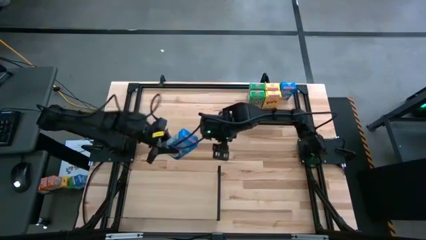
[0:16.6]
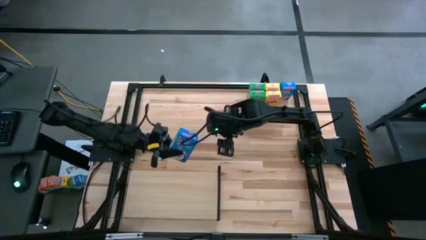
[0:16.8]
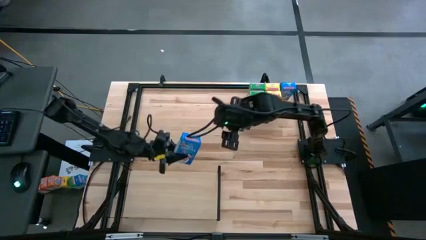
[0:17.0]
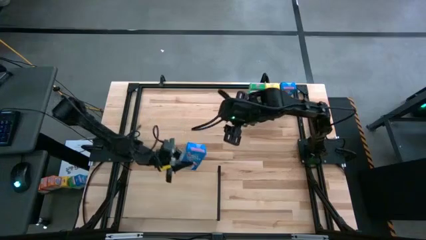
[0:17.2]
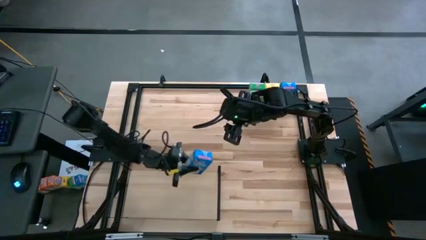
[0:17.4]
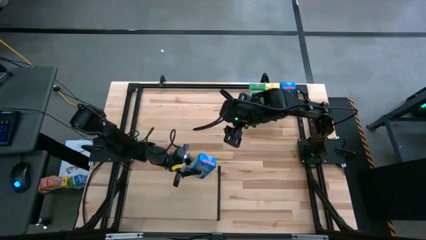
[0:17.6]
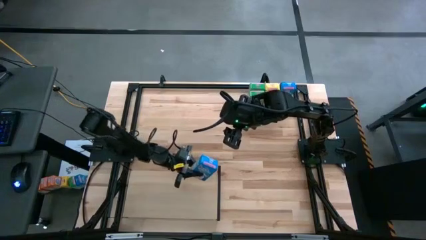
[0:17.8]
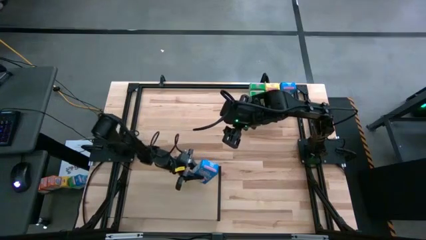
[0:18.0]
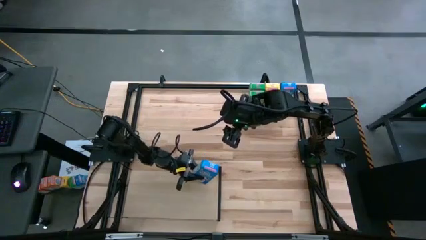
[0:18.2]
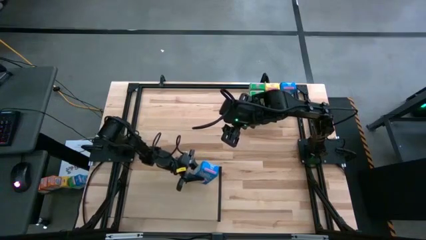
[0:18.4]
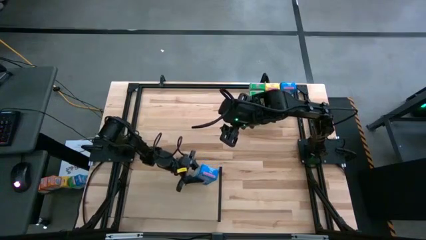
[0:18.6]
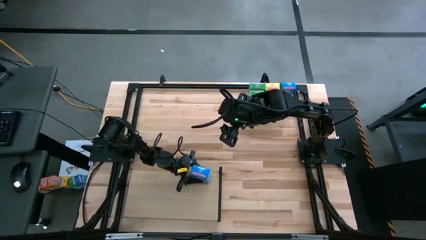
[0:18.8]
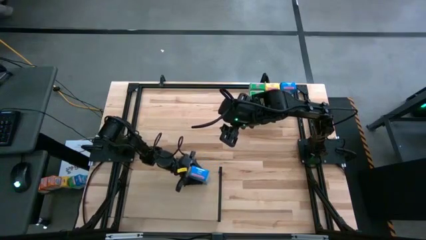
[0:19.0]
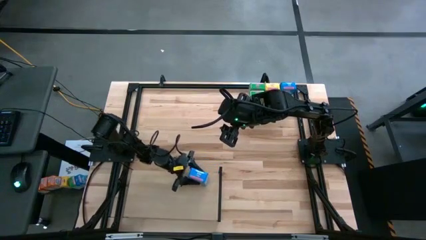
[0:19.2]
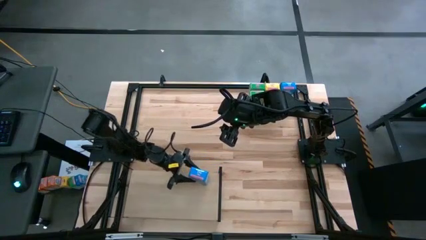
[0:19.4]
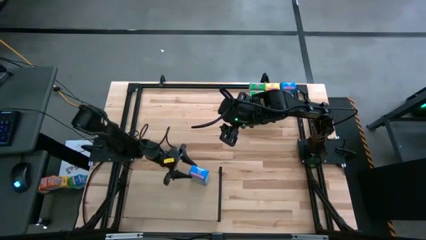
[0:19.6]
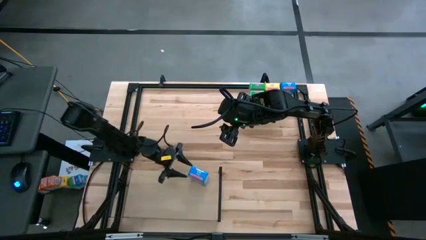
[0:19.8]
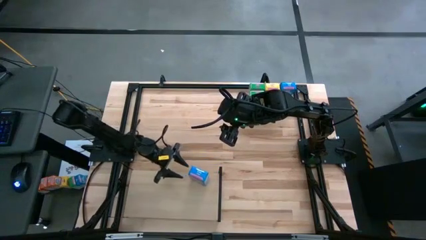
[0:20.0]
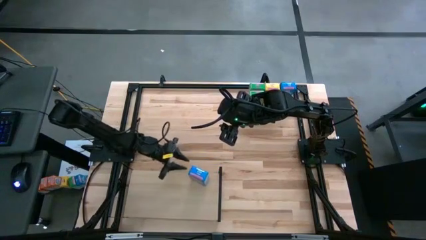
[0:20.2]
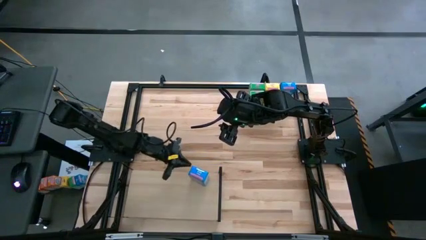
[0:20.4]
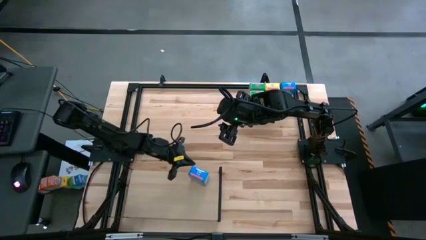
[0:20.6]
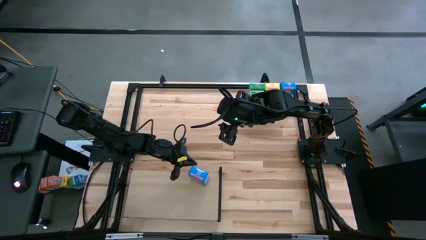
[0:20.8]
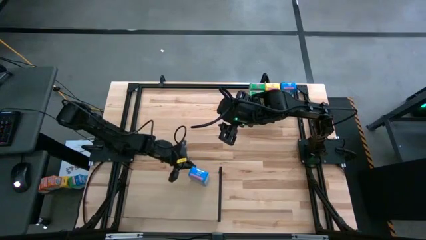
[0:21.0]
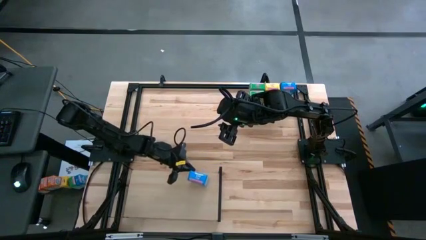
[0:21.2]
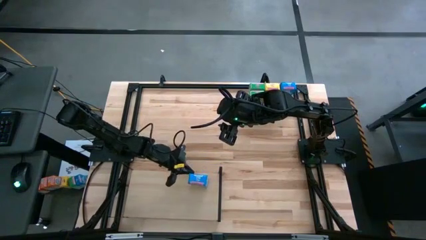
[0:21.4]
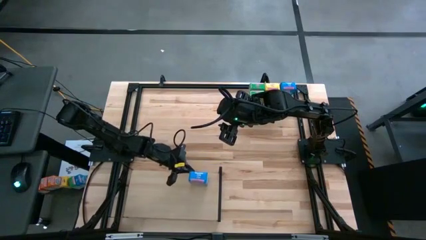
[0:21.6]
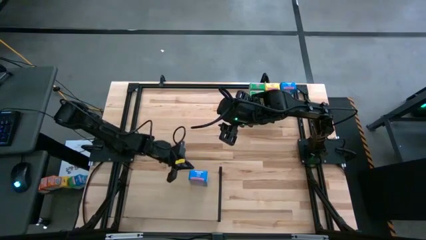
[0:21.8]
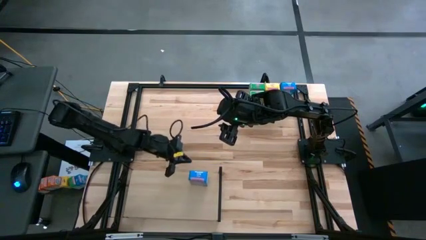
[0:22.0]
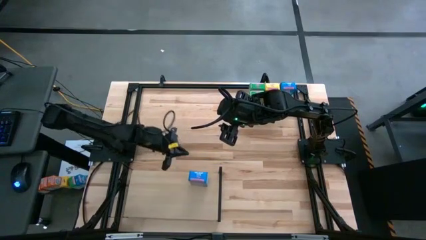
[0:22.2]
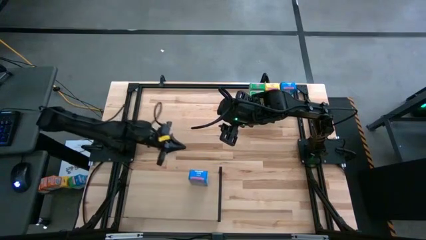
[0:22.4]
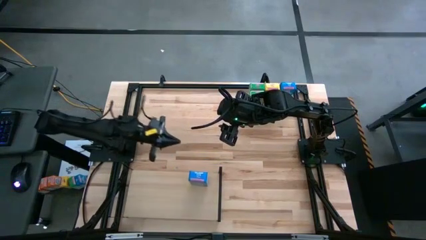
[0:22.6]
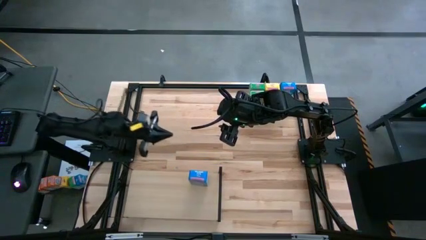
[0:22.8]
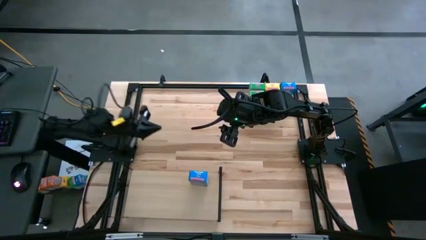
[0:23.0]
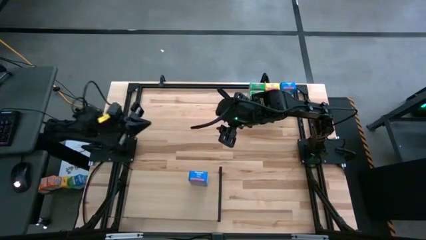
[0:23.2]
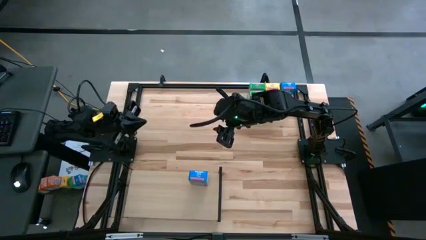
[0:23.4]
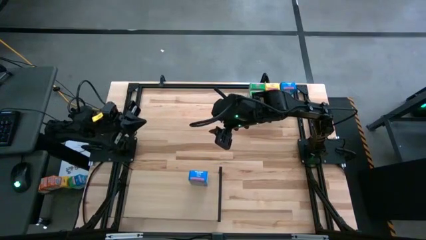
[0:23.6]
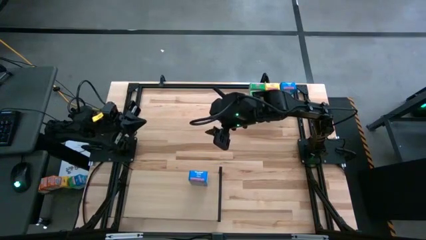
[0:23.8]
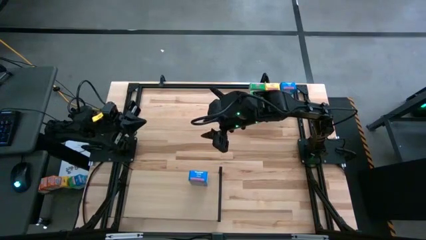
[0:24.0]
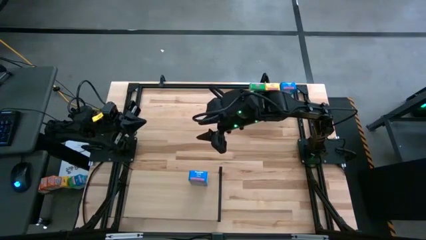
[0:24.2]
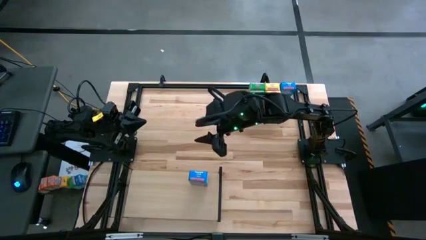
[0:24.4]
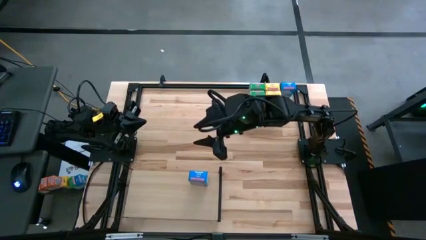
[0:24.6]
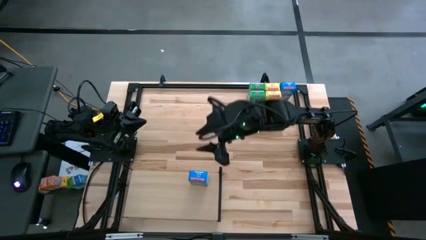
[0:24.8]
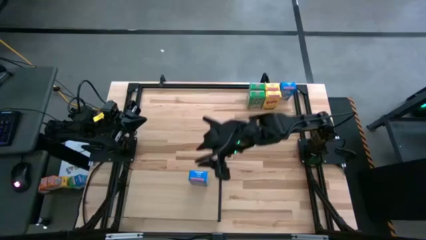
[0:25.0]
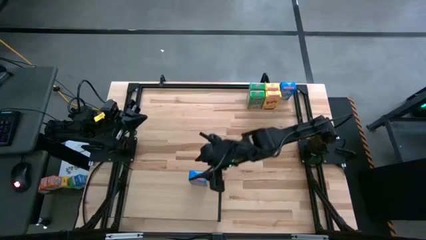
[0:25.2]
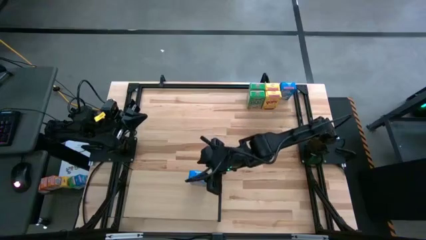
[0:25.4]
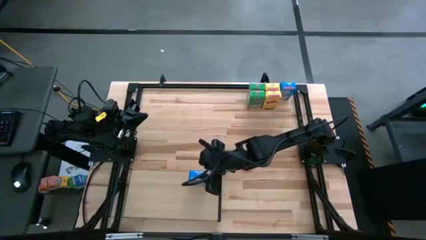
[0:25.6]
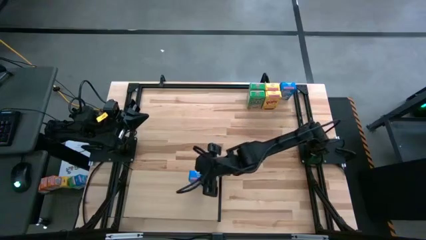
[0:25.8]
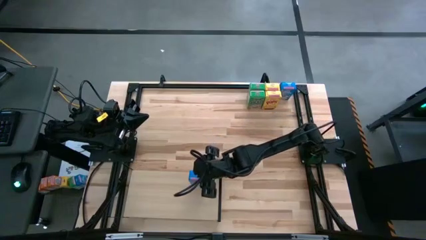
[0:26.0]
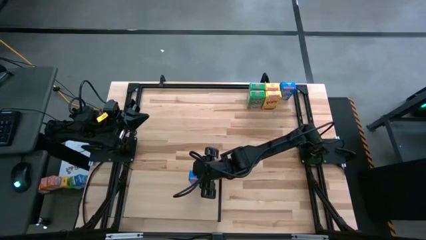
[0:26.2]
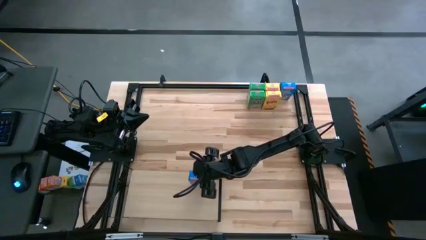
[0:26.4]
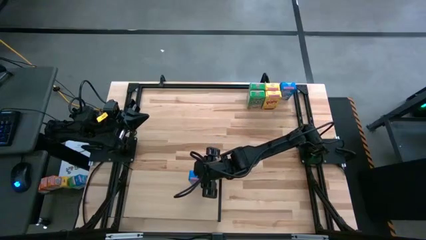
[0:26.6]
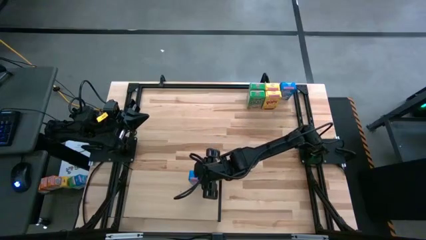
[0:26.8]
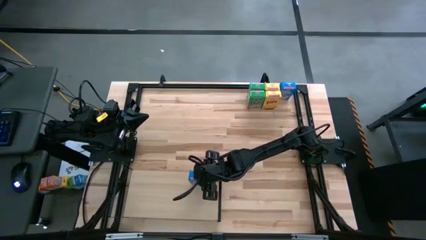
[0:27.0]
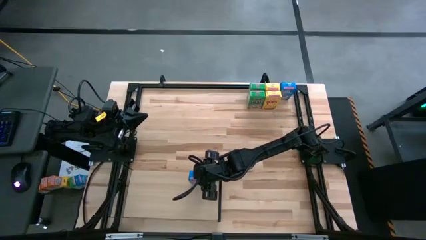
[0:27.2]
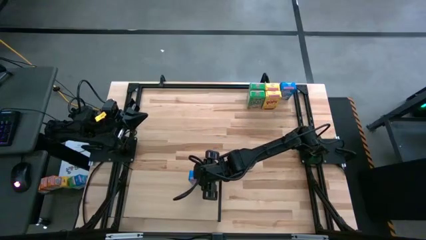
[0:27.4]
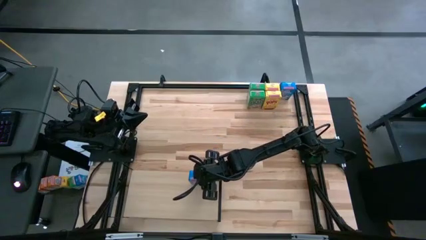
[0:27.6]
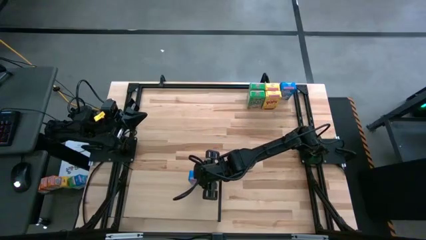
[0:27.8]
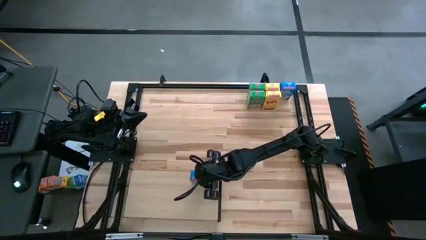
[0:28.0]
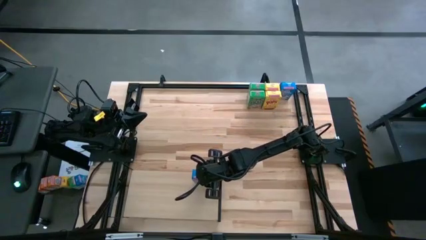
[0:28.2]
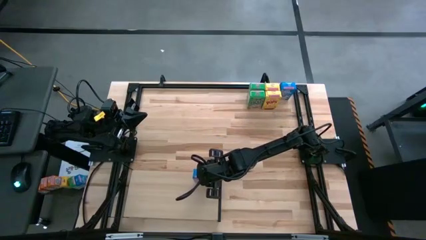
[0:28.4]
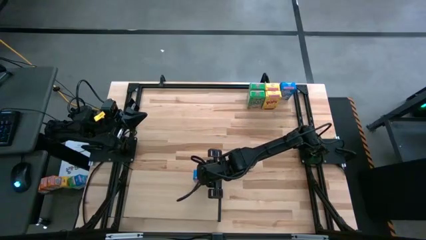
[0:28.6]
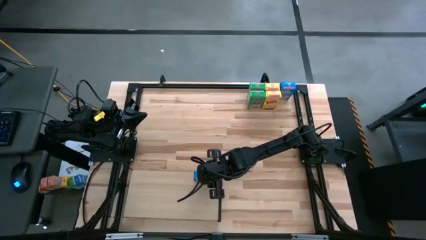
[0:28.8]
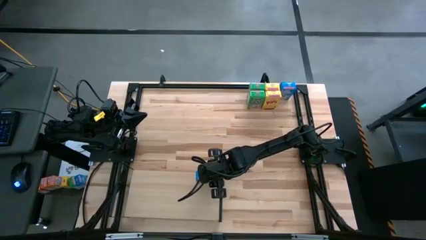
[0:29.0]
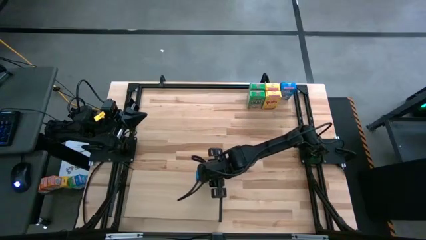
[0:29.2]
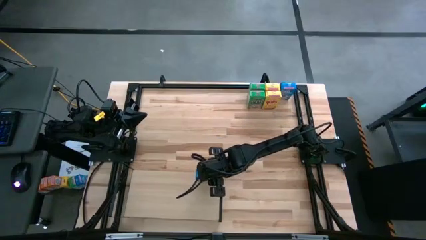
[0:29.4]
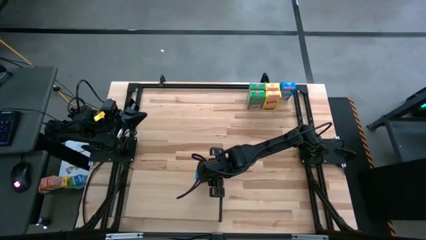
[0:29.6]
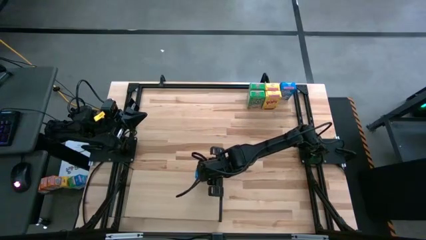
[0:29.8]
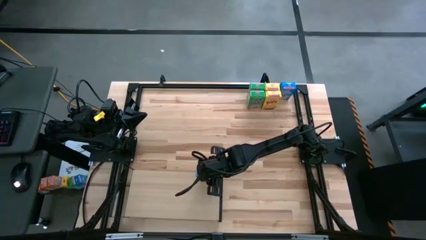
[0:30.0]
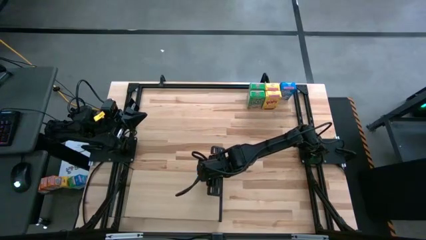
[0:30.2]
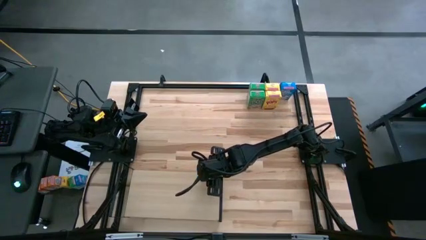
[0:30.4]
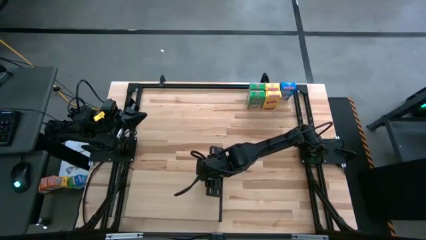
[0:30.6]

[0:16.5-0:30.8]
Task: Stack cereal on shelf
Put the bottom blue cereal box on the shelf

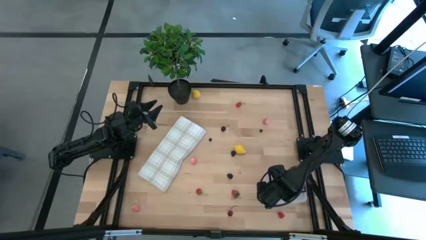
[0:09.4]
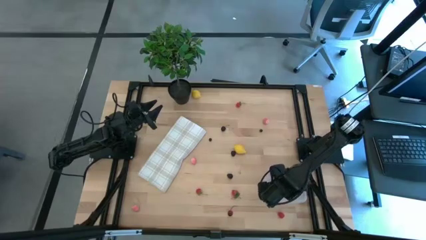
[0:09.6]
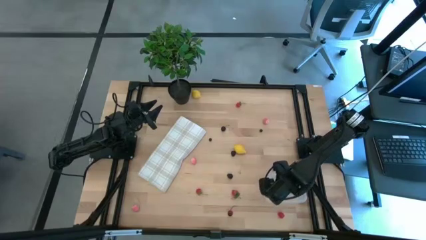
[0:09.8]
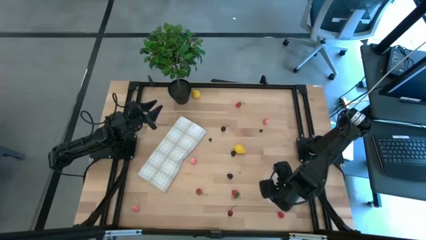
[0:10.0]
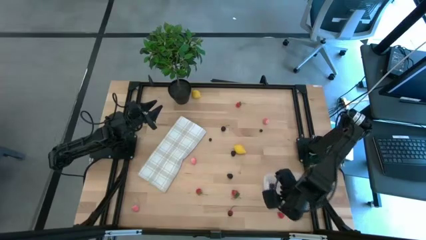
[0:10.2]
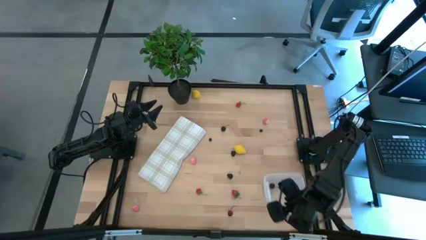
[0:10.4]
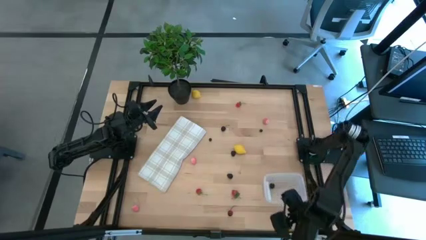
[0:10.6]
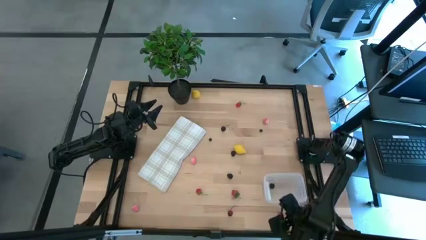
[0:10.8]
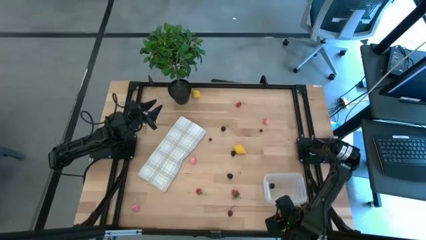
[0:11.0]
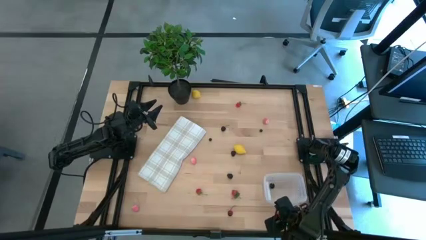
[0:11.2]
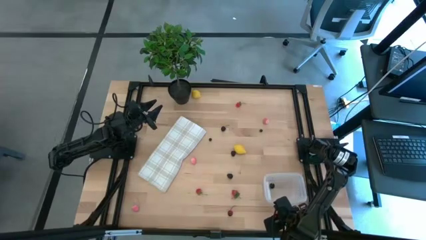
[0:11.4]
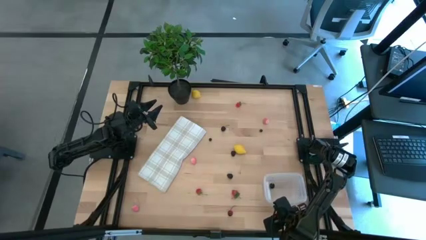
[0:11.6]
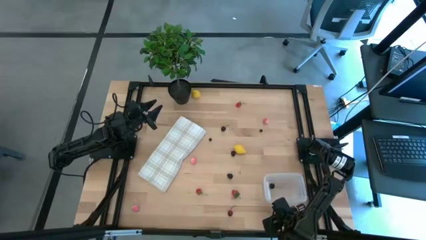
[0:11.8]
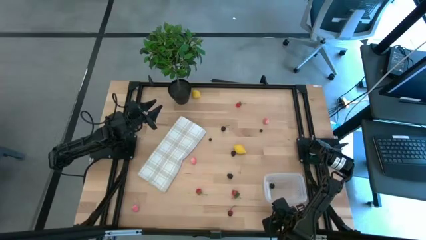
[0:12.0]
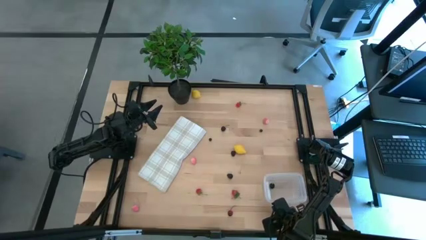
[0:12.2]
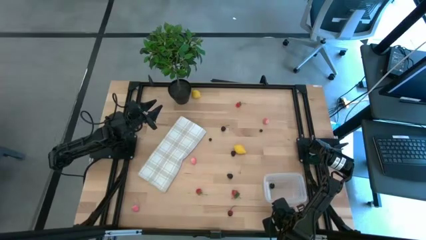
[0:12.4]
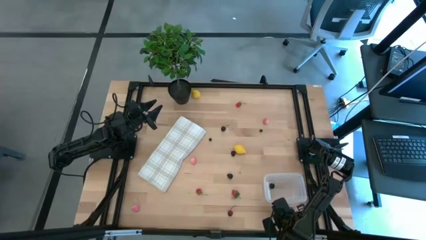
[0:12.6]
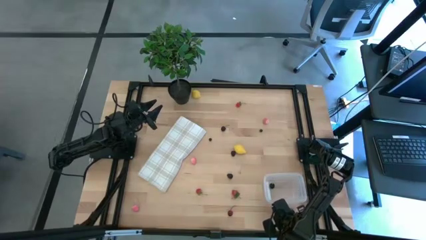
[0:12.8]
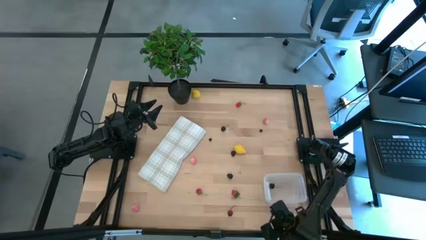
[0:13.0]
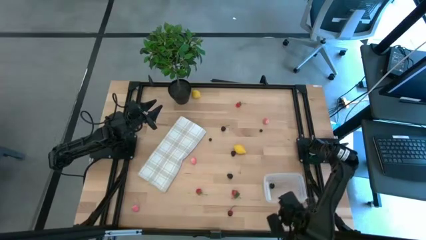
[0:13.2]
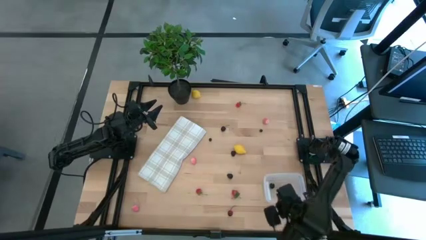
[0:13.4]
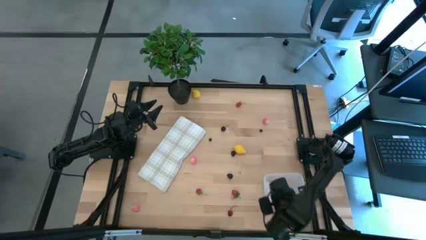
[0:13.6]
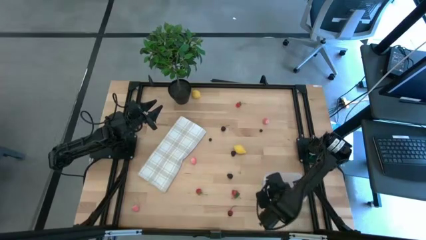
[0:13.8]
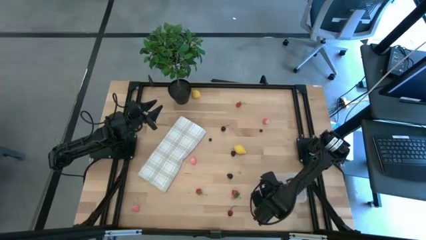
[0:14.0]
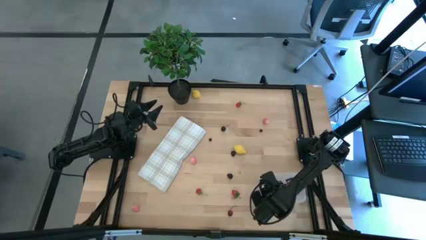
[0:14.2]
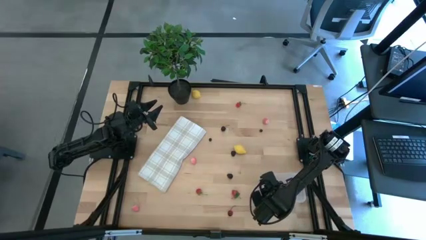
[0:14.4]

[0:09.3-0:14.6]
Task: Pick and placing Produce into tupperware
Put the red raspberry into the transparent bin
